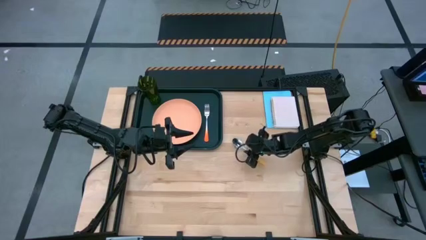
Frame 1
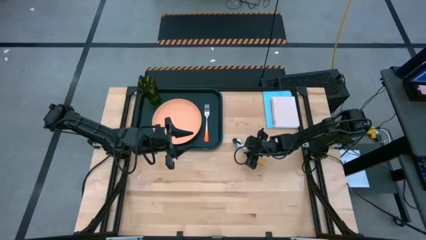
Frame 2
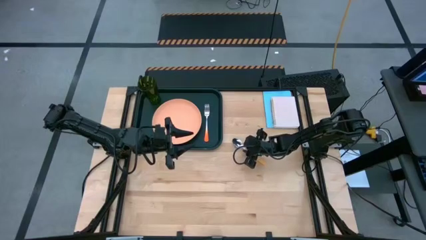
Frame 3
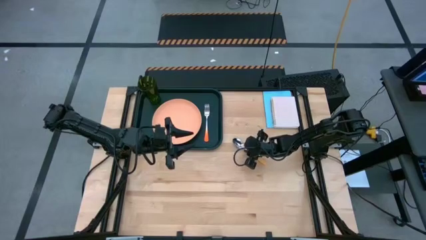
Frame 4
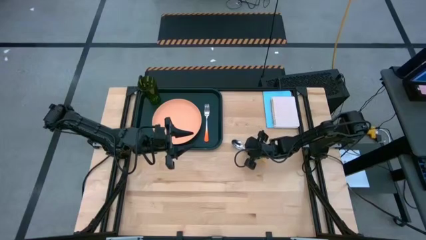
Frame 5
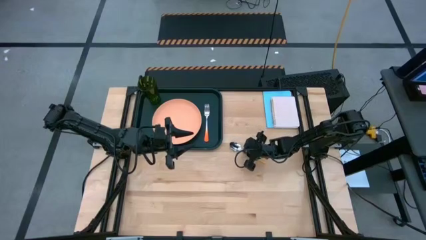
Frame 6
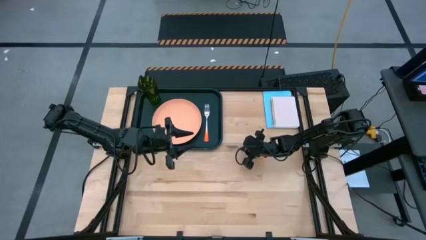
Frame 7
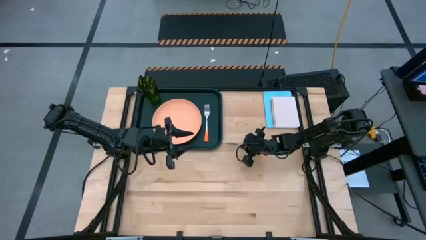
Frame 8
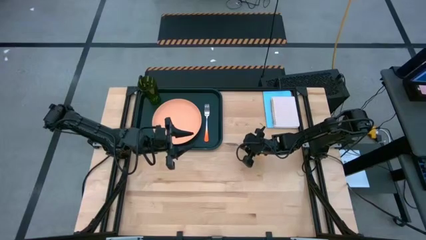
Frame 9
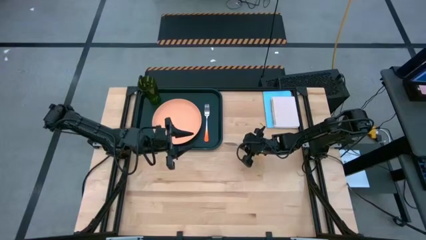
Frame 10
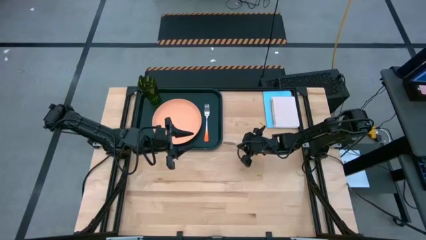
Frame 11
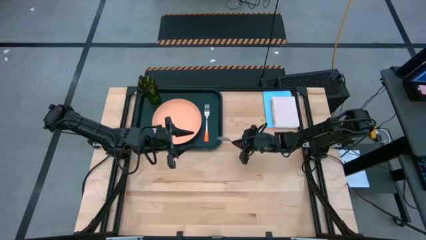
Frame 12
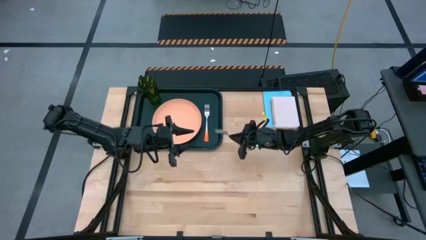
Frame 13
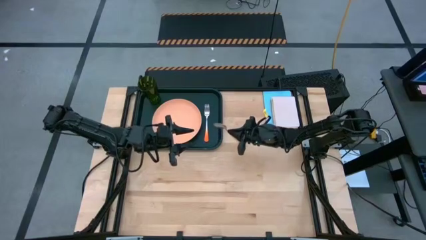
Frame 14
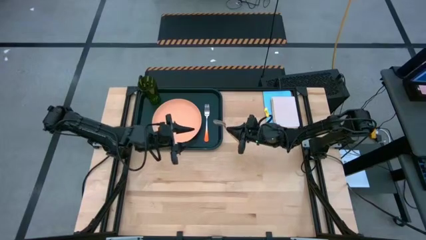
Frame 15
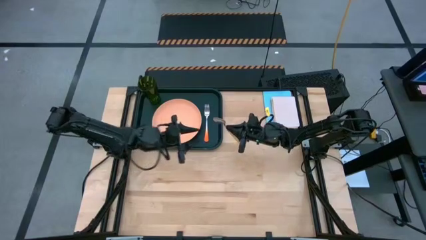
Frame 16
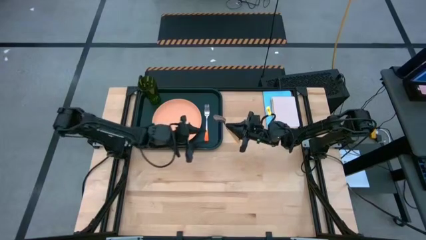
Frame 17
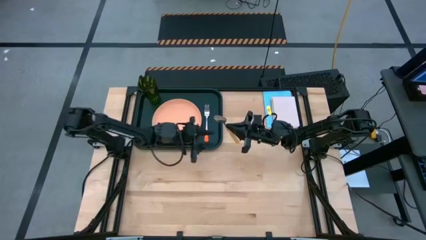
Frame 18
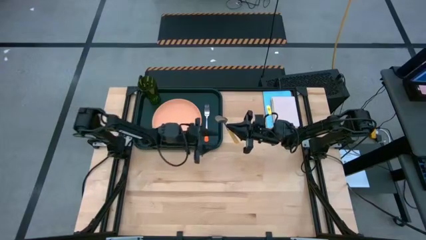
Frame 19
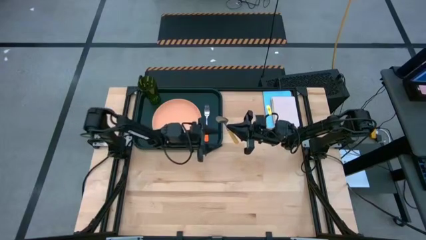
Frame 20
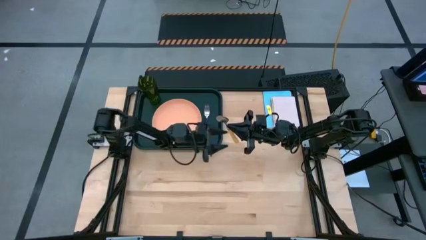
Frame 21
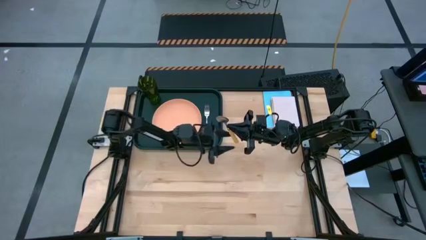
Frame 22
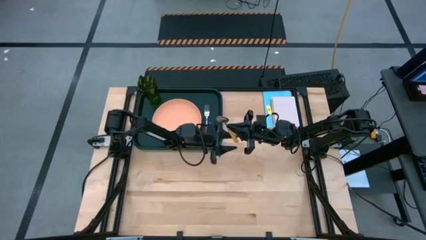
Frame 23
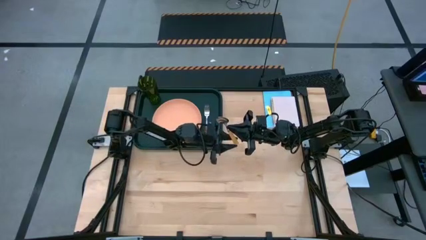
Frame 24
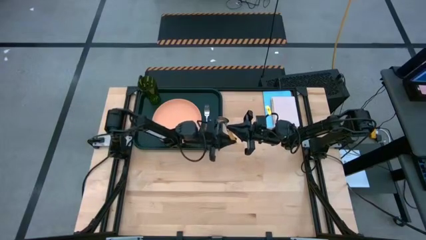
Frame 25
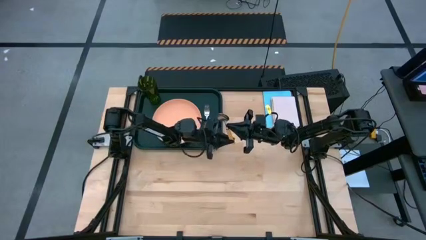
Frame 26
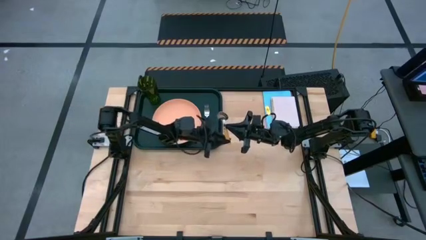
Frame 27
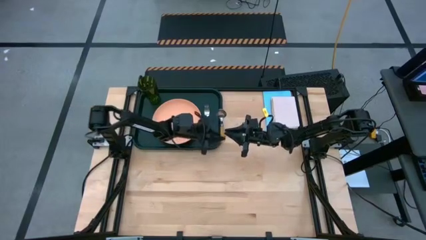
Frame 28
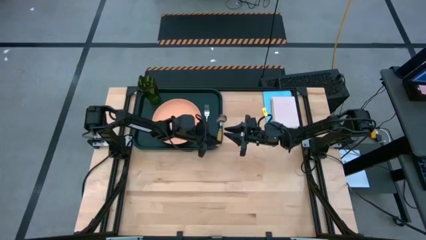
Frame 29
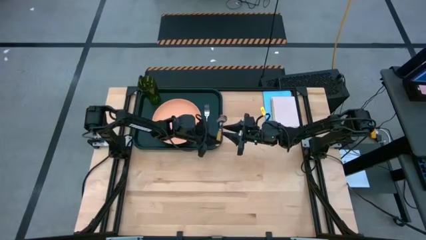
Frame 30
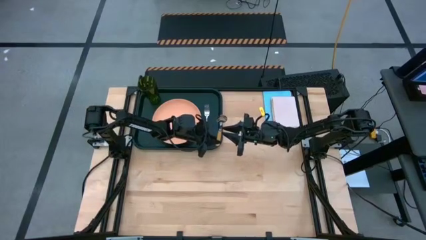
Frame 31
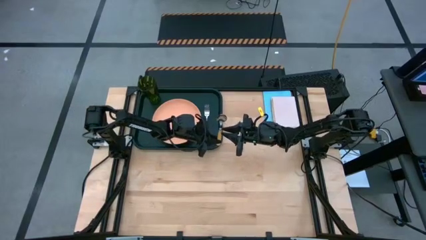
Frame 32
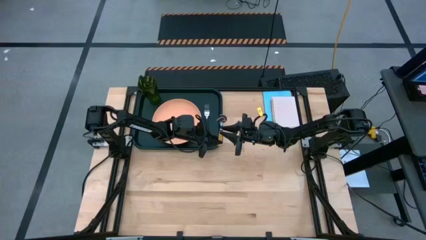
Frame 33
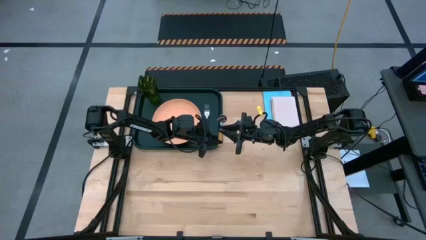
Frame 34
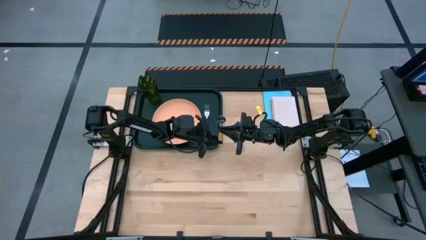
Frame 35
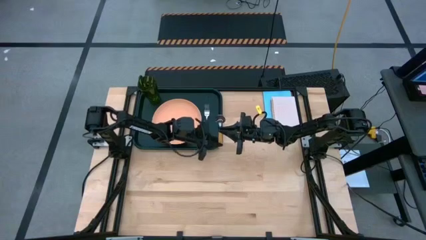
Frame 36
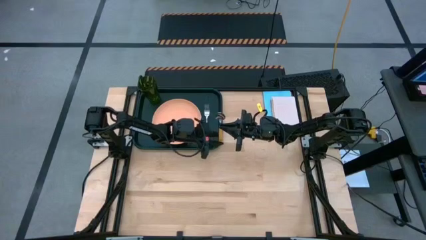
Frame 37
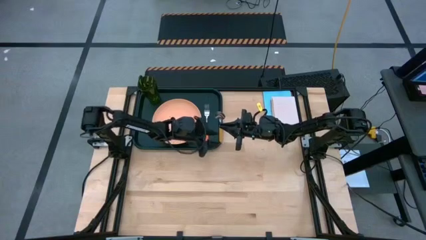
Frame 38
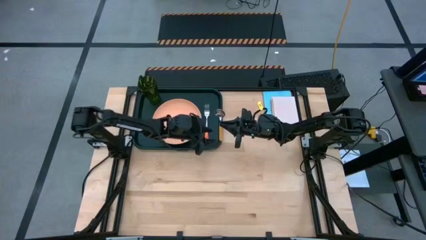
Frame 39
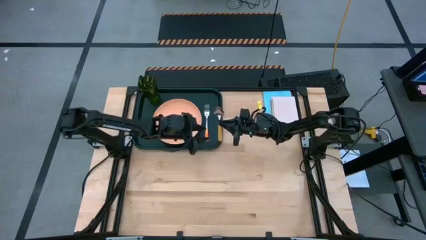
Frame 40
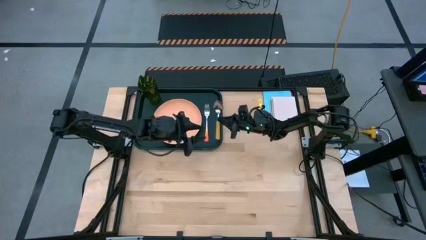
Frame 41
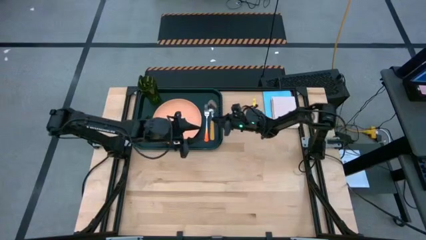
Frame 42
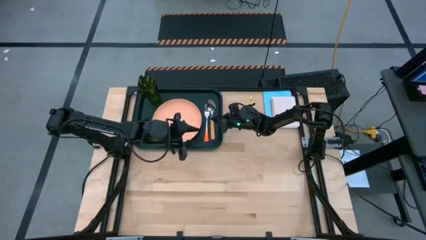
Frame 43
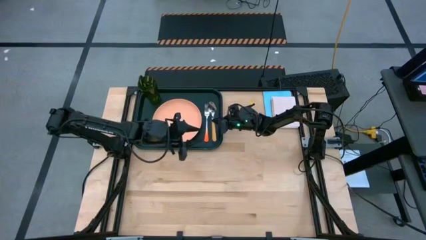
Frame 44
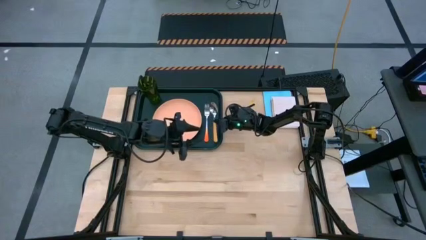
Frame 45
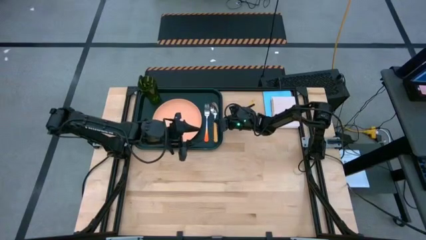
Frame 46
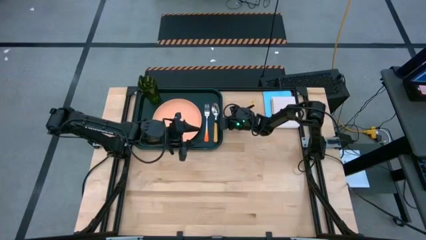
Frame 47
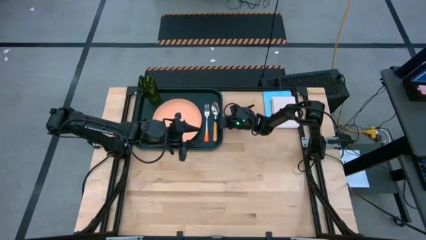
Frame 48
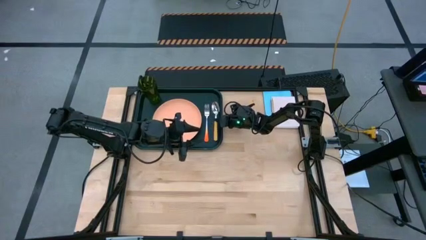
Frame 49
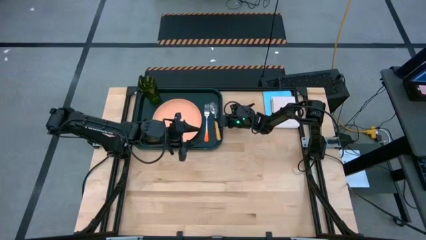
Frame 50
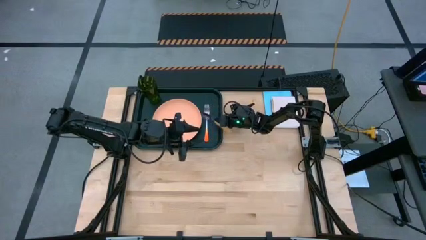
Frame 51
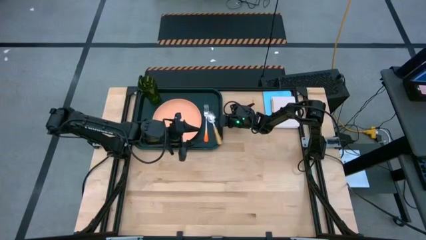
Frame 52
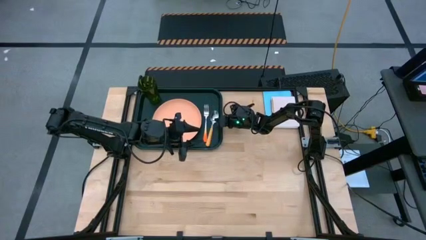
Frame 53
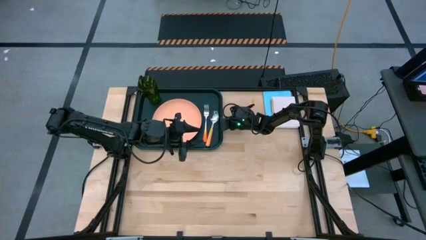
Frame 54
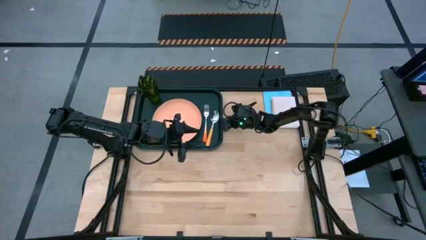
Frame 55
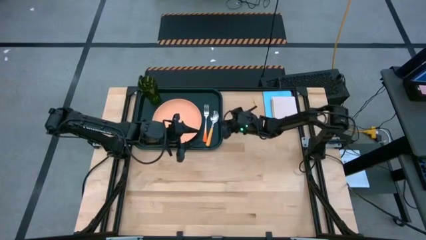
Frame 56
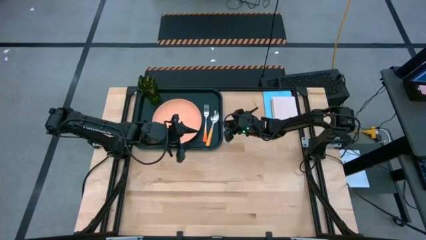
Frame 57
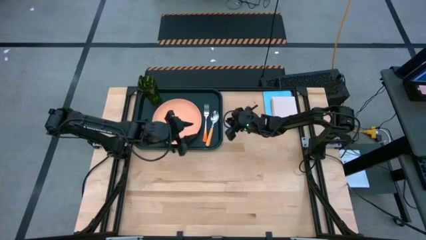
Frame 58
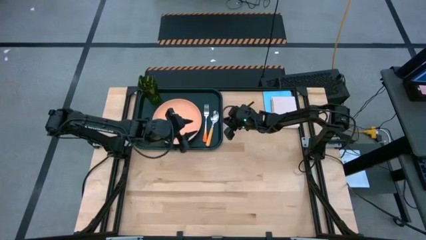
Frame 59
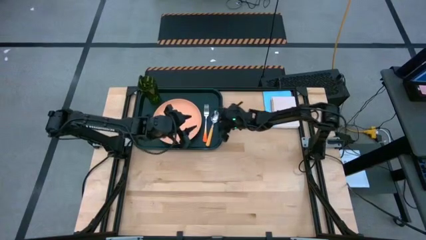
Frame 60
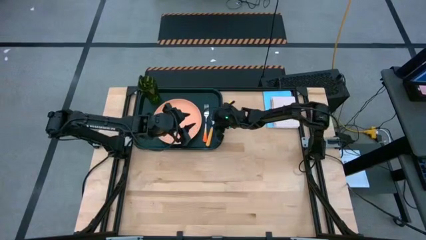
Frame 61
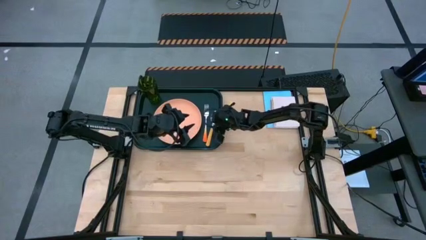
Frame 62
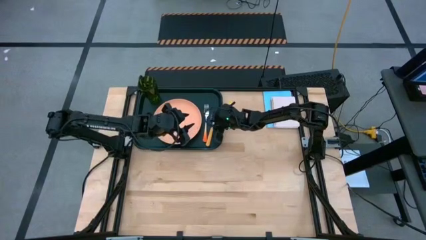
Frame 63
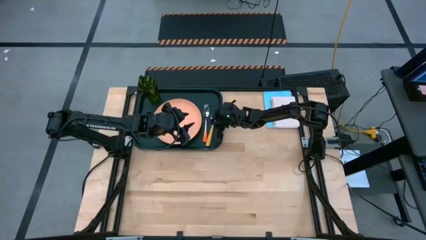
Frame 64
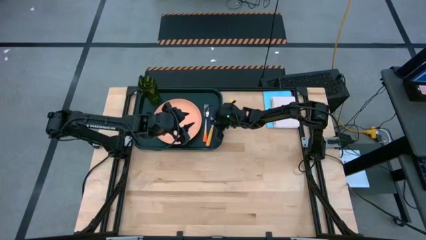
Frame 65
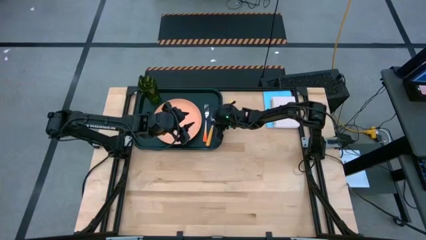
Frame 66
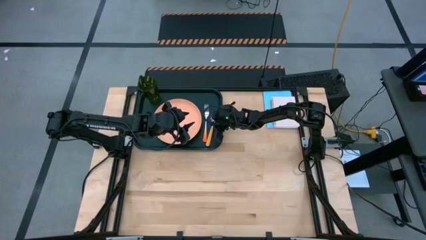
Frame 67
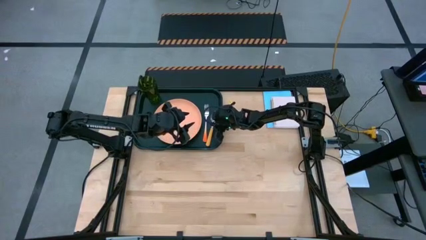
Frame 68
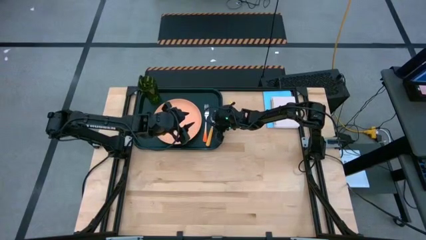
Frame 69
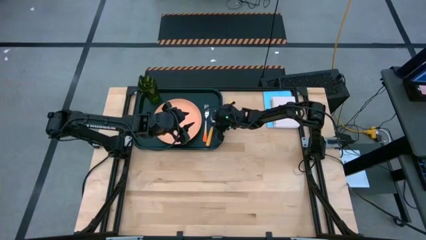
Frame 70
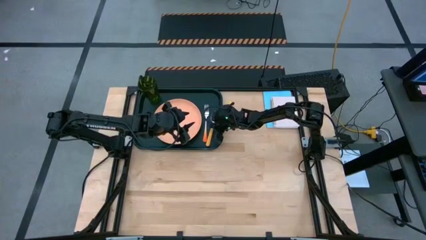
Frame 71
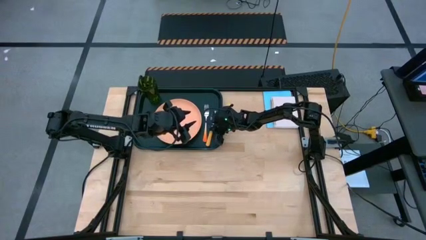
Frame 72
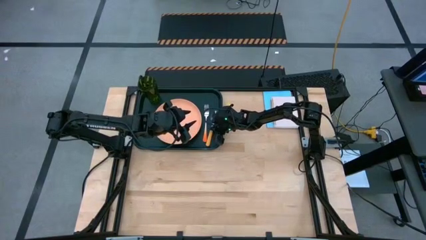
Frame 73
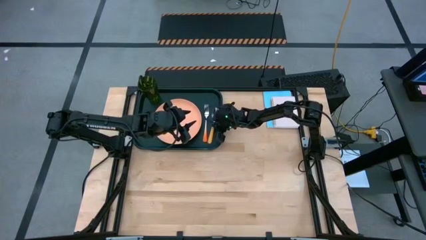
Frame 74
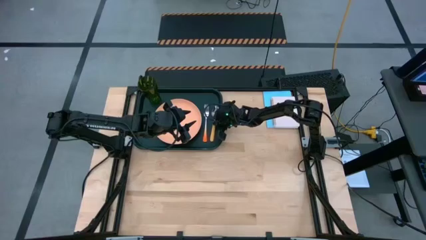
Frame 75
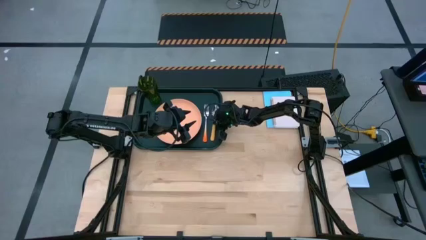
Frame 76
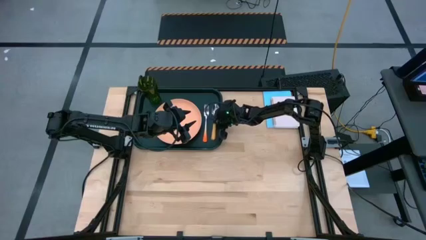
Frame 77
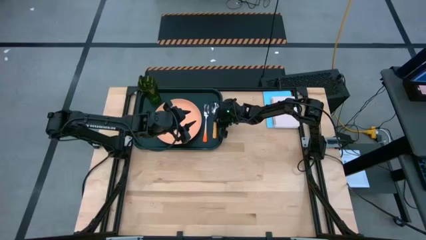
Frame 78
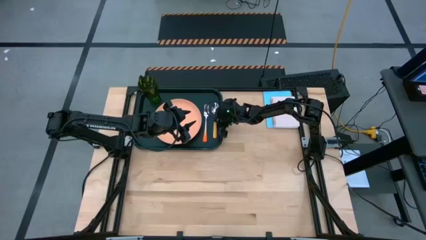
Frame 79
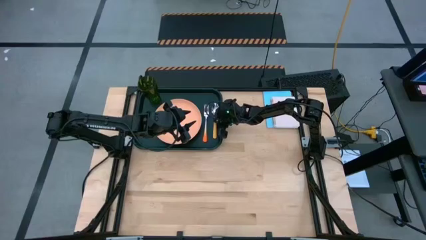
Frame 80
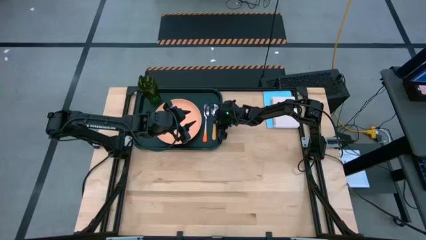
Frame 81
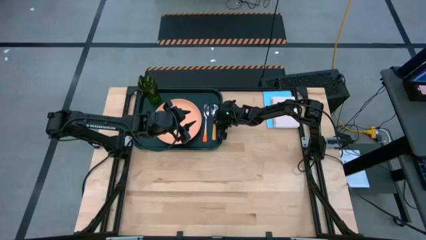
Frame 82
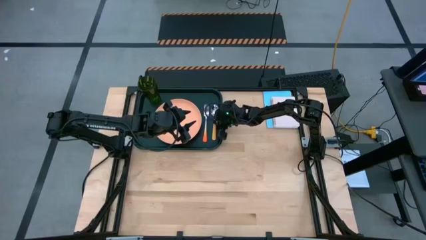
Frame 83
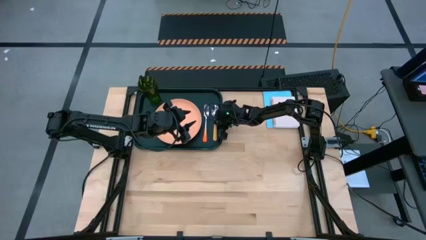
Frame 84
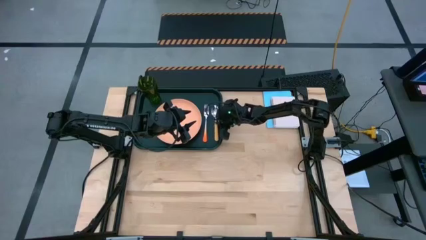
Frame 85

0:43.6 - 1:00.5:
Task: Pick and place plate/cup/fork/spoon on tray
Put the yellow spoon on the black table tray to the right of the orange fork
